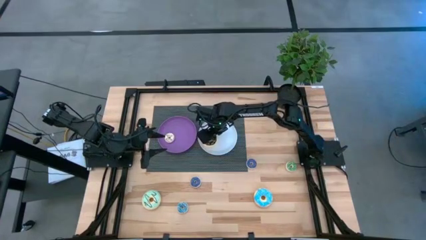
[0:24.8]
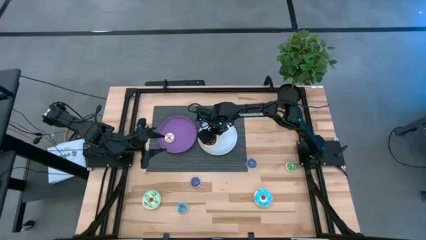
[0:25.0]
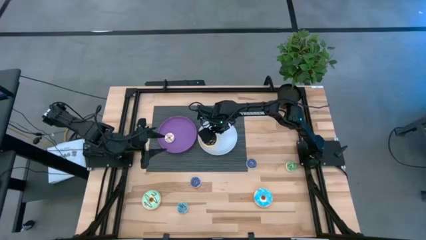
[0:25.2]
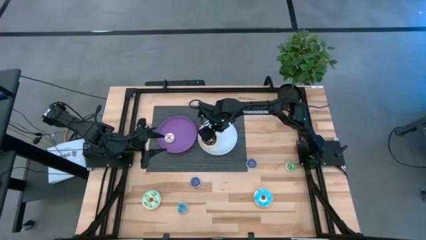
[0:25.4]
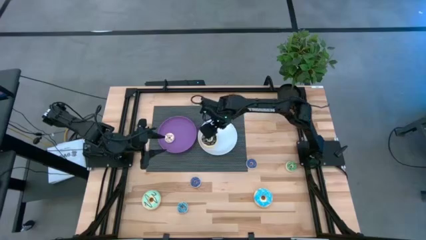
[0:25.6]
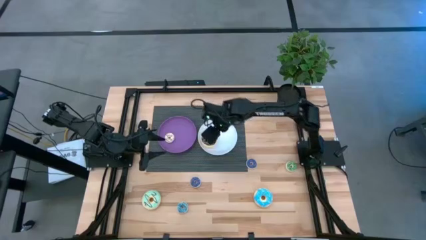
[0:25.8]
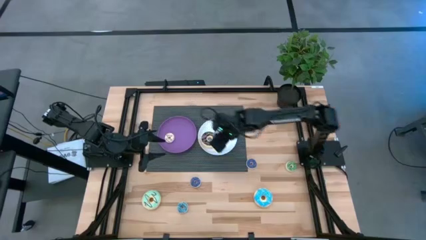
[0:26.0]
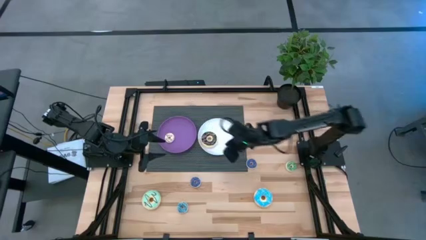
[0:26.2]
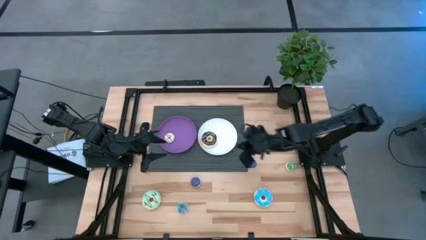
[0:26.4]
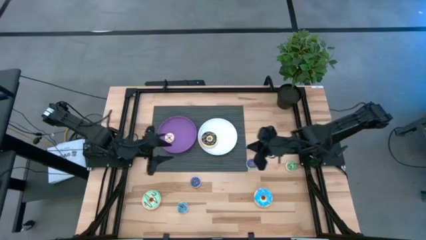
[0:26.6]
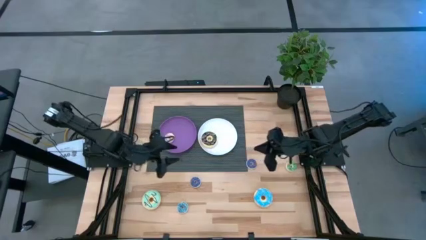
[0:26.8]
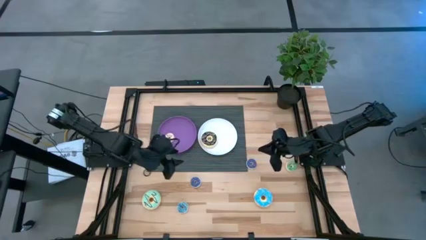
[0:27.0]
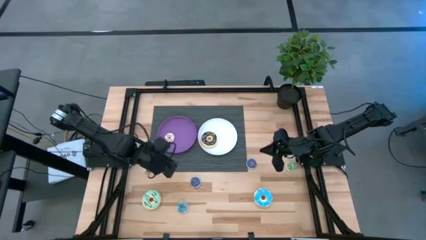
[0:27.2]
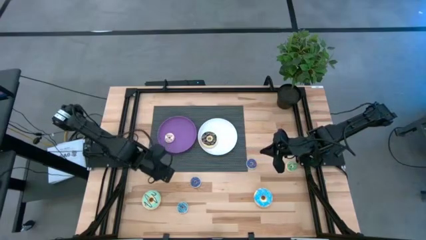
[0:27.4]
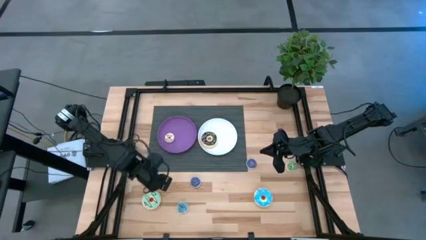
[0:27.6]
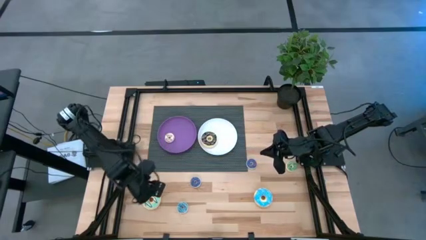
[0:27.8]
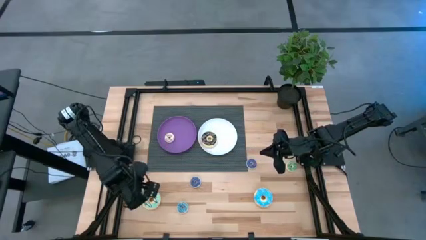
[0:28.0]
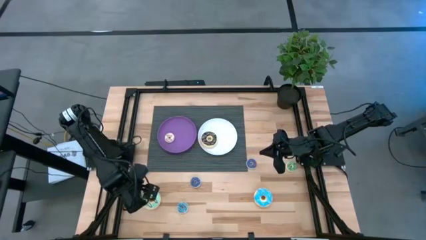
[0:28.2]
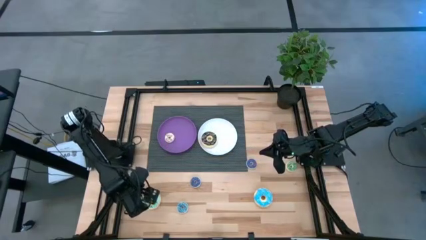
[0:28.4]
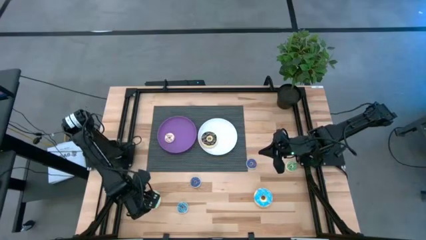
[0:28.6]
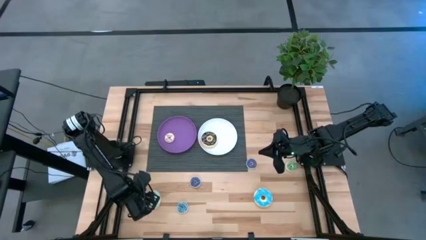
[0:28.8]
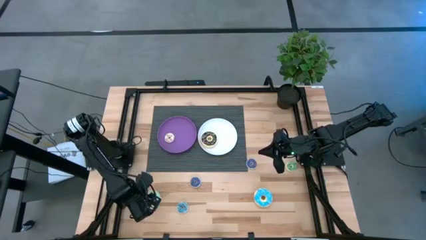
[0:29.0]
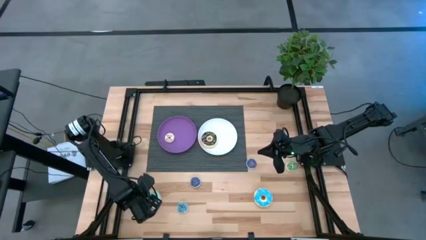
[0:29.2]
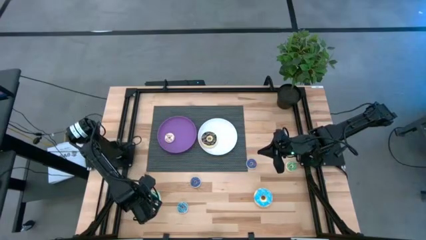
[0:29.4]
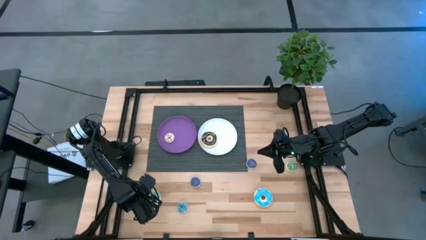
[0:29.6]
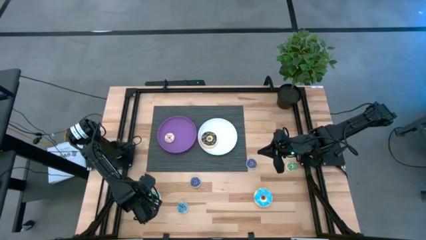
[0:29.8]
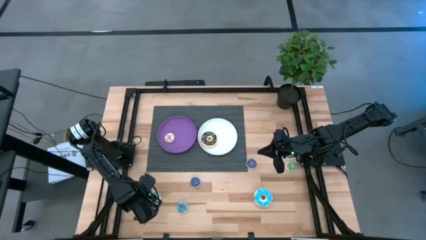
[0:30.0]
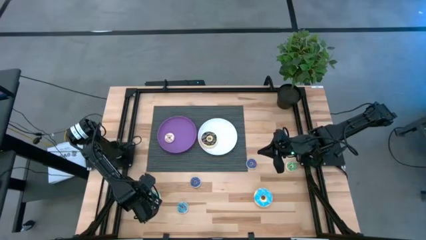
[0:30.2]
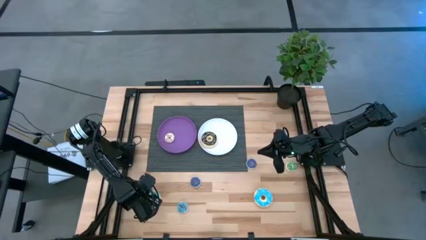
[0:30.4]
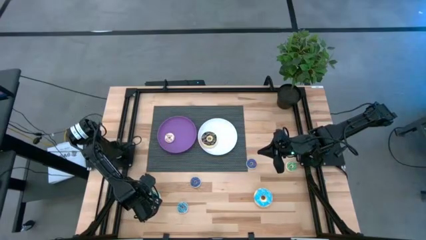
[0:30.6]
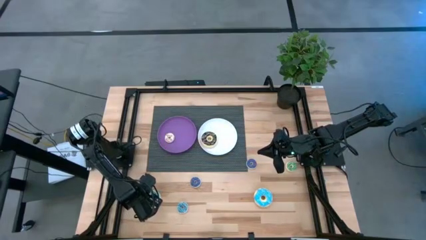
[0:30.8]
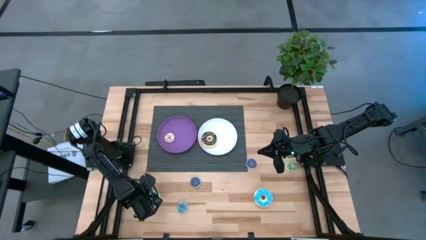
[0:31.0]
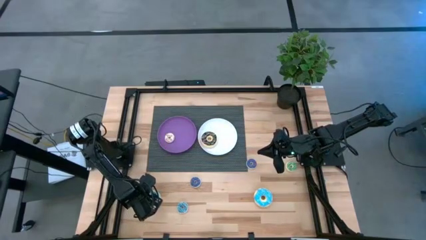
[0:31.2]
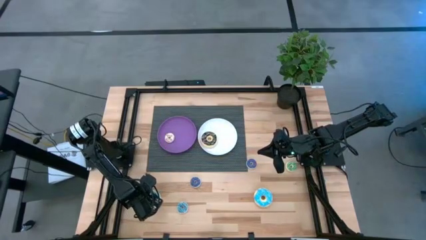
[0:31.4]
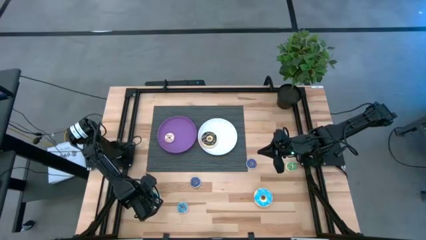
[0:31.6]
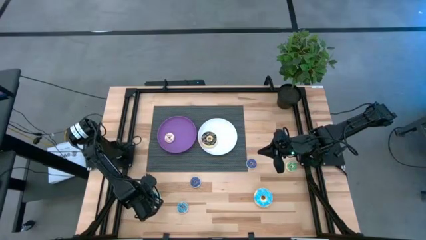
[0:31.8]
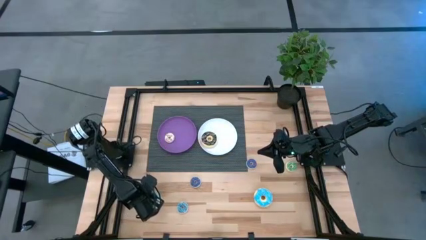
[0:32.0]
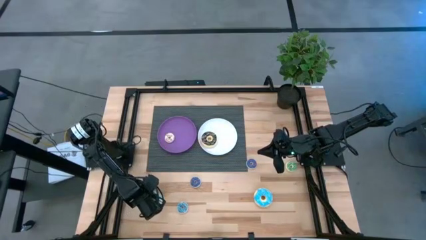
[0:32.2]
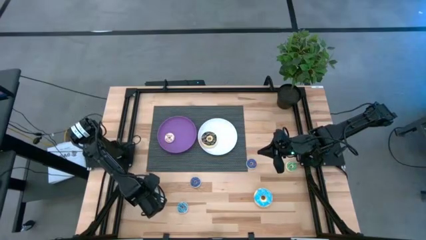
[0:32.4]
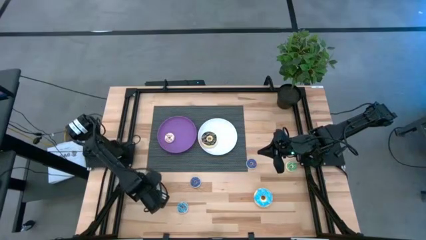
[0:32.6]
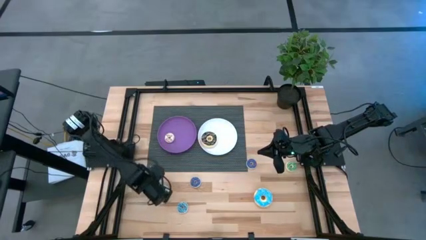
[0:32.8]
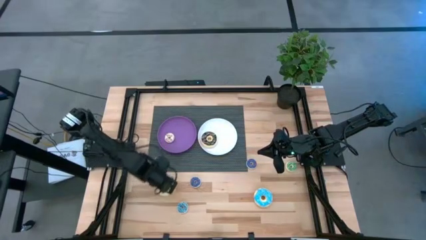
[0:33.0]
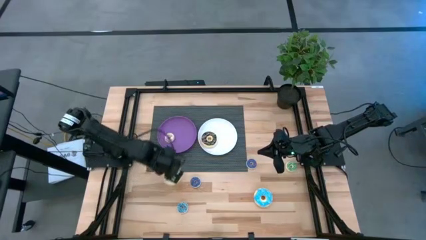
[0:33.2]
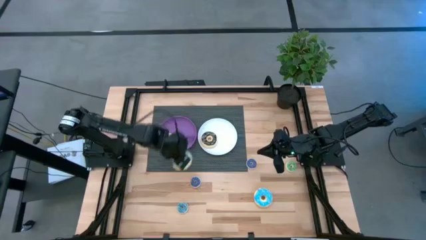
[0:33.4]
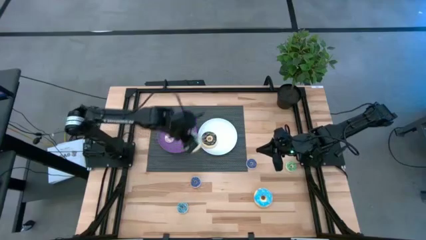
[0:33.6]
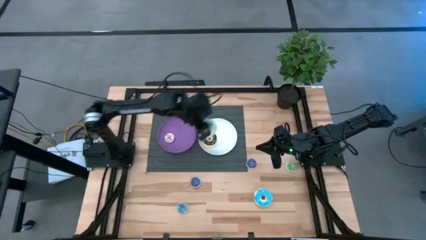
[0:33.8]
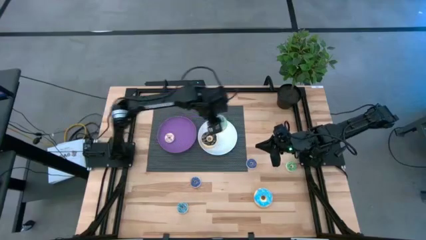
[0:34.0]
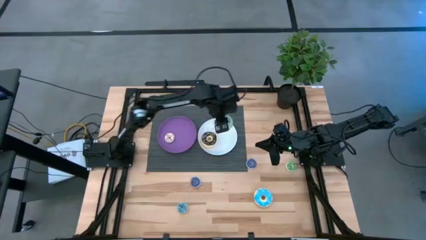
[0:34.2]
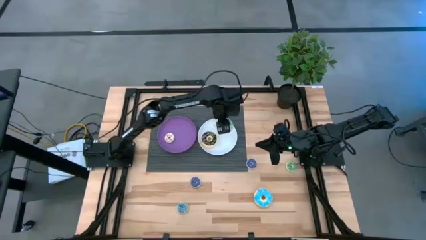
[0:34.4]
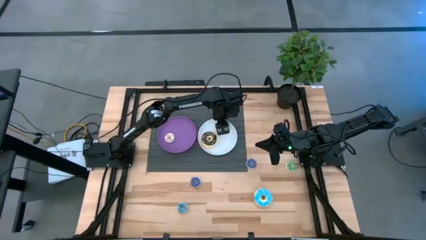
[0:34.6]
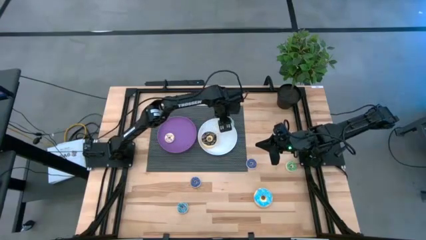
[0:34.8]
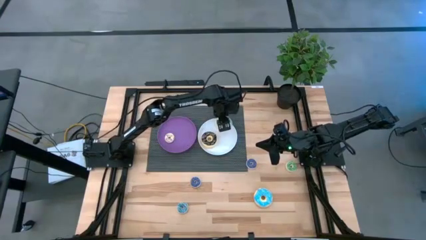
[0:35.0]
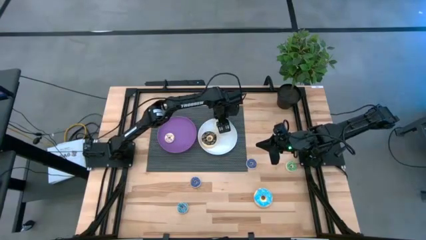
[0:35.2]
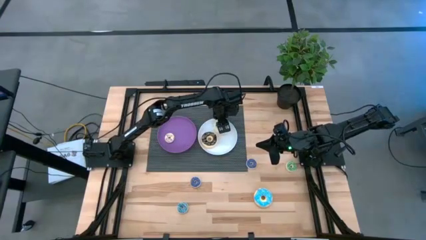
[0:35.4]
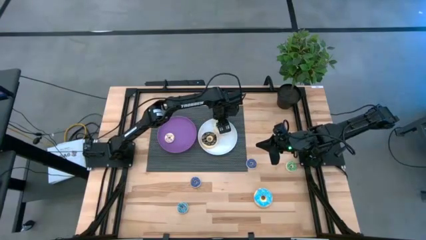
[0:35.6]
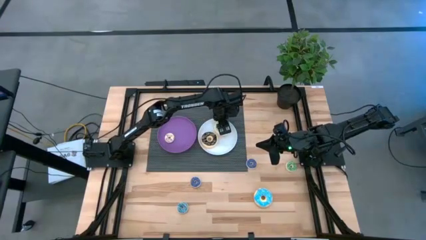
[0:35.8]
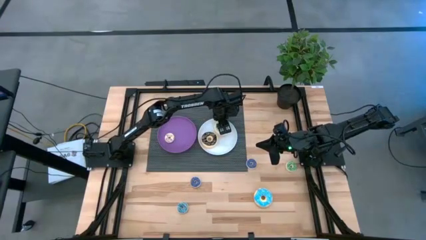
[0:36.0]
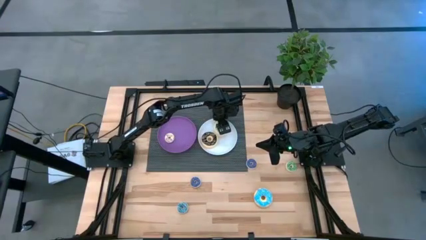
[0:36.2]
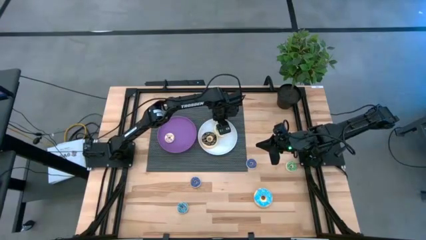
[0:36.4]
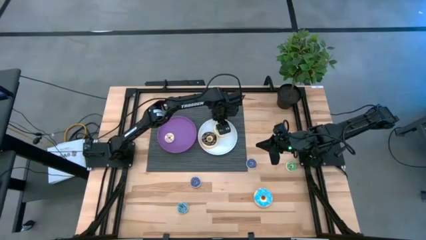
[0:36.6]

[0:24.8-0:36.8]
Task: Pick & Place donuts
Put the large light blue donut on the white plate
